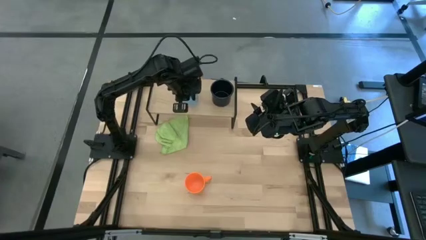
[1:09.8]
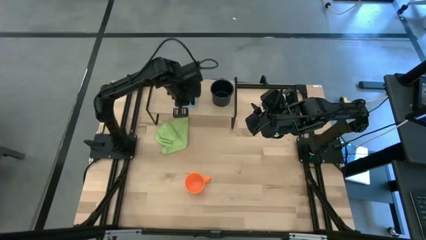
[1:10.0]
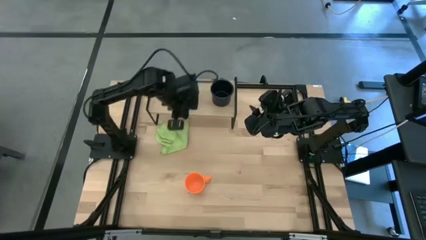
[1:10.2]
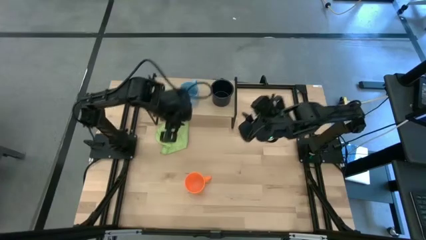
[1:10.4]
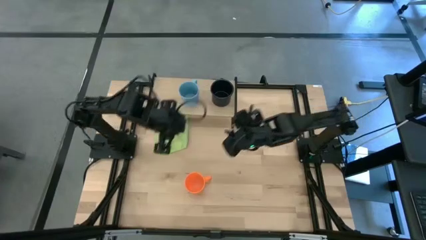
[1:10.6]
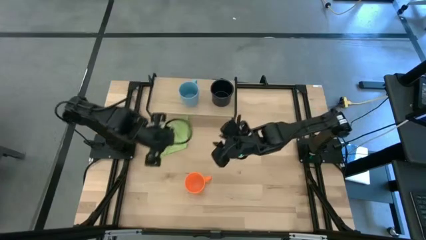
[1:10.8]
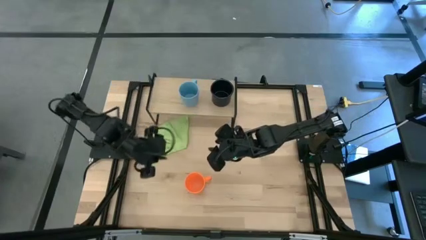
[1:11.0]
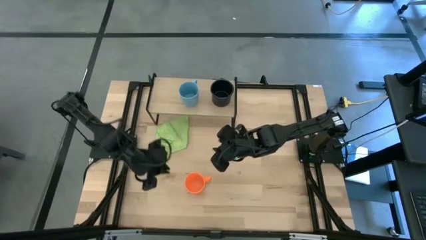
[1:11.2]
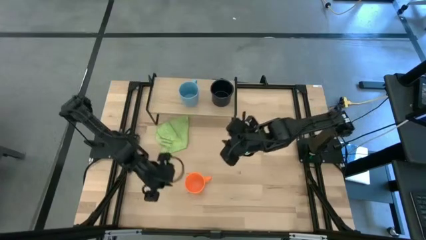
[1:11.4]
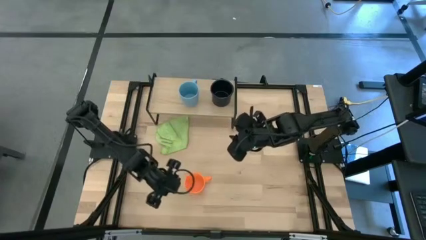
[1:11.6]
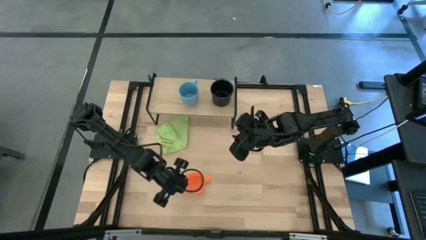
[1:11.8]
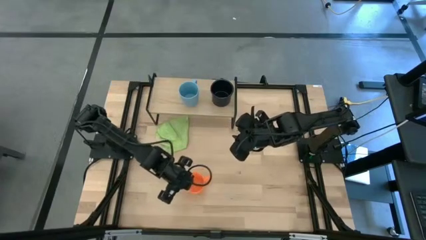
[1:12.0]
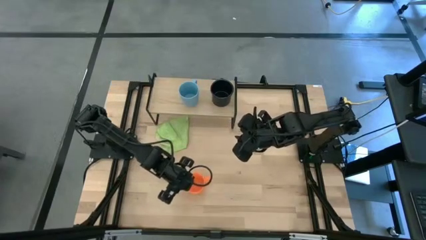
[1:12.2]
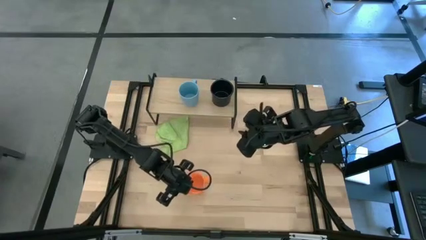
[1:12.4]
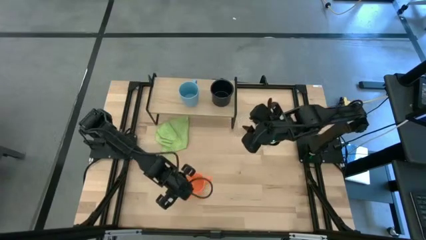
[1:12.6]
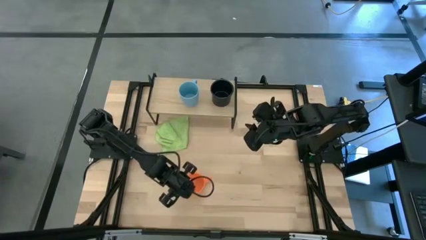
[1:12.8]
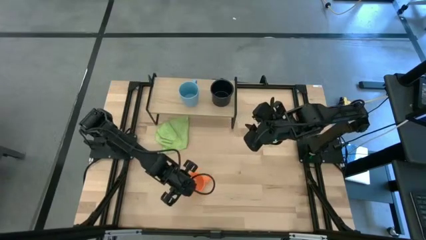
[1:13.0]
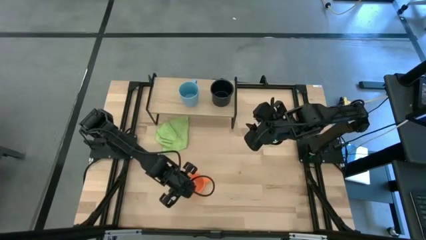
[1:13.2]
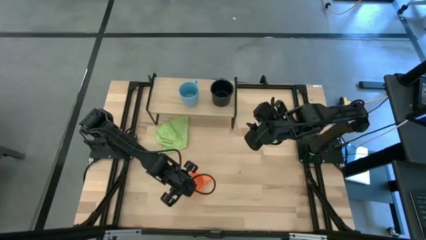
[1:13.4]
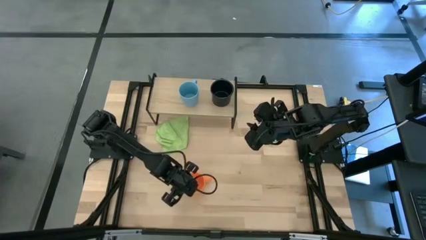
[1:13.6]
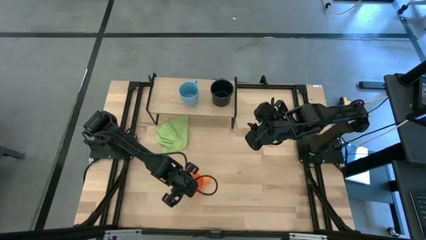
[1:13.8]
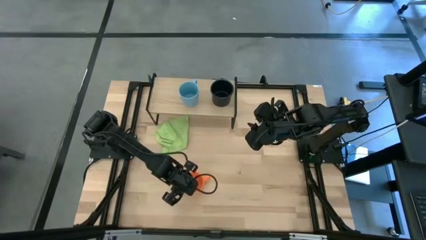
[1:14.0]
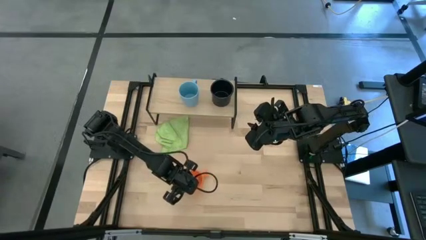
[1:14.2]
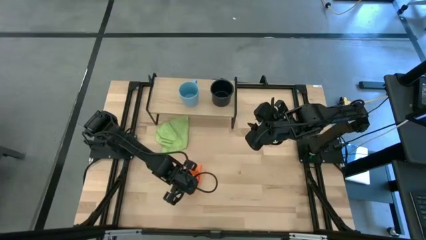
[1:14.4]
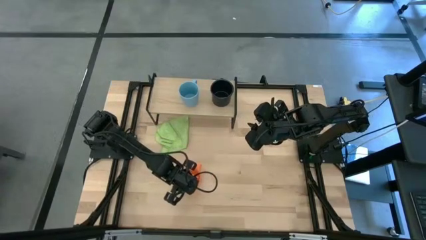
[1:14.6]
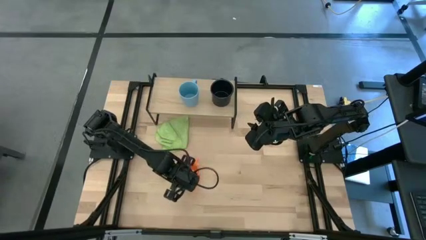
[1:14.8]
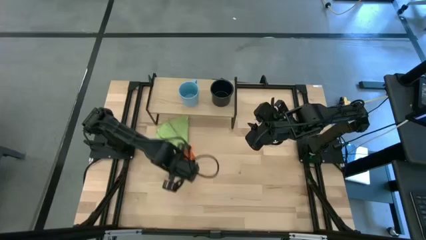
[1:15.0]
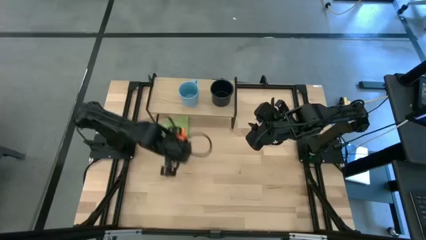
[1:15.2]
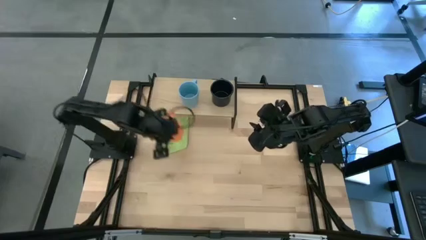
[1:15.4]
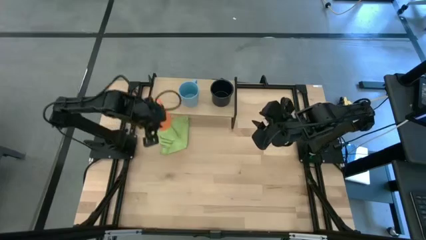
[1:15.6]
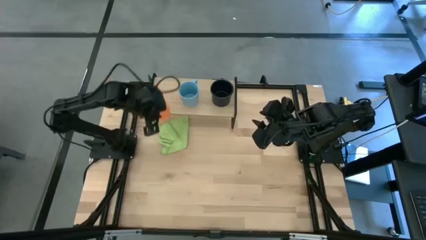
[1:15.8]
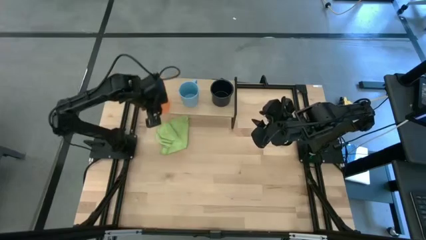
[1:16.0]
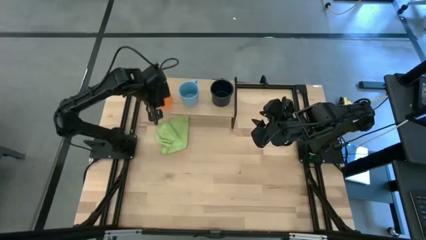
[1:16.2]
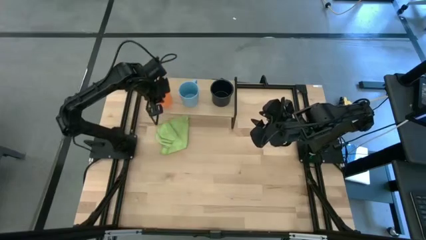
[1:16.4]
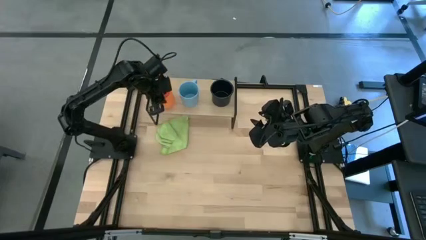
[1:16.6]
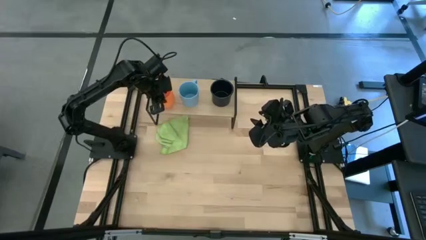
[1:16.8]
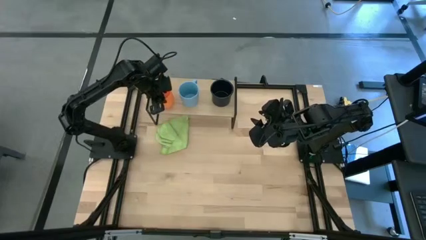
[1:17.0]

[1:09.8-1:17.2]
Task: Stack small to large cups/mugs on shelf
Put the orange mug on the shelf

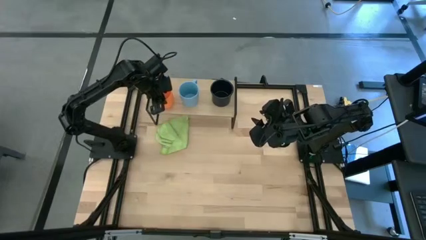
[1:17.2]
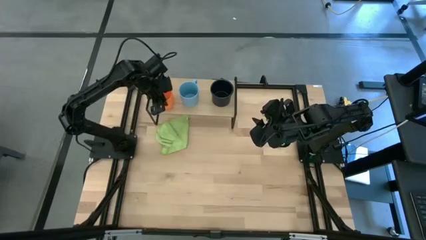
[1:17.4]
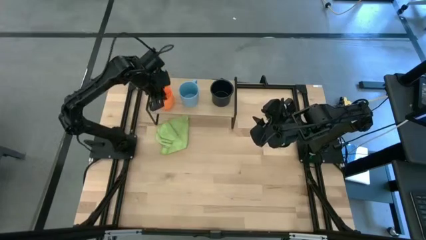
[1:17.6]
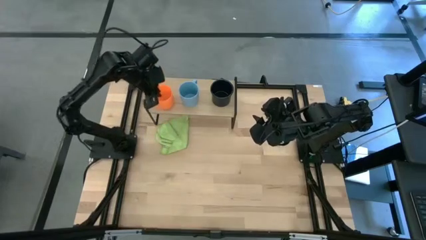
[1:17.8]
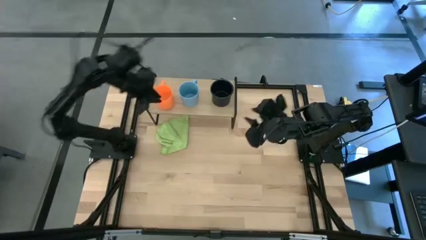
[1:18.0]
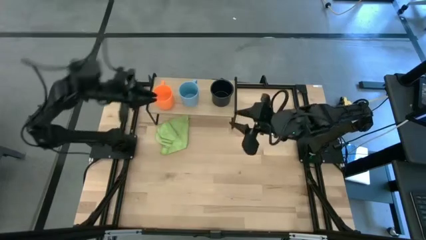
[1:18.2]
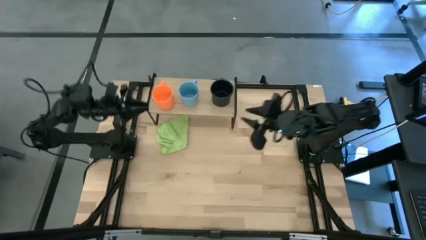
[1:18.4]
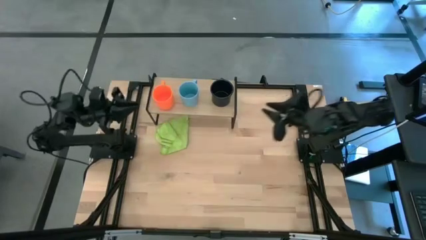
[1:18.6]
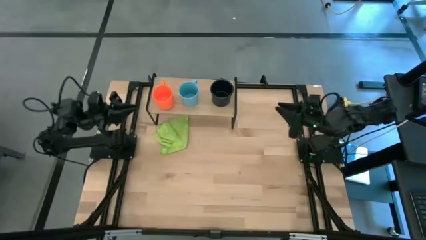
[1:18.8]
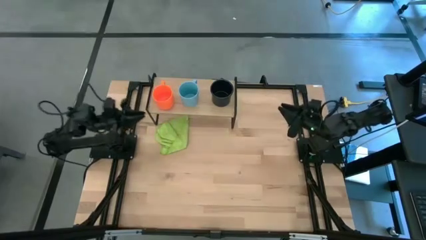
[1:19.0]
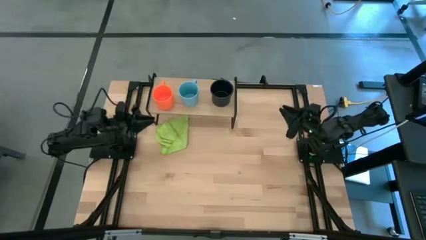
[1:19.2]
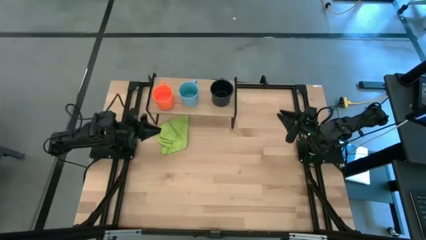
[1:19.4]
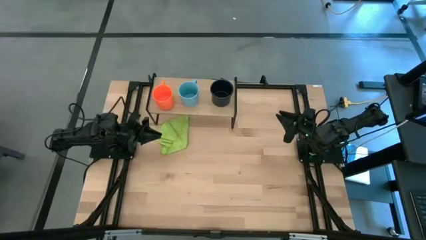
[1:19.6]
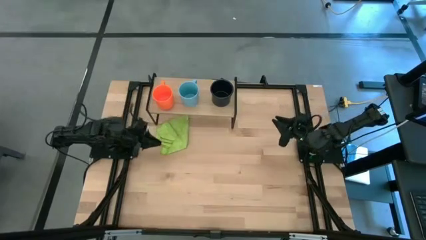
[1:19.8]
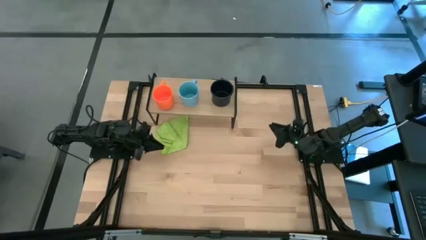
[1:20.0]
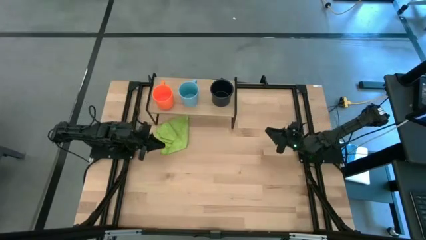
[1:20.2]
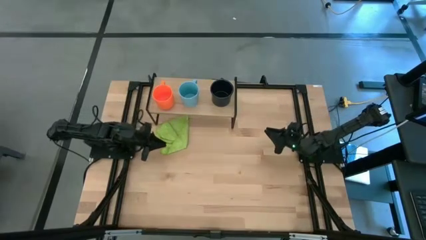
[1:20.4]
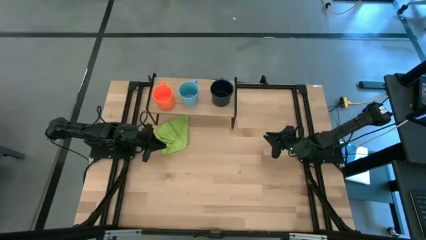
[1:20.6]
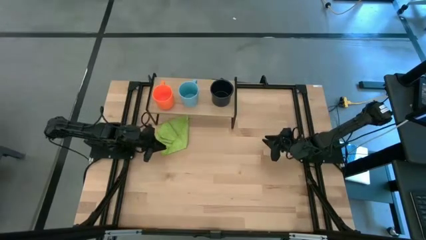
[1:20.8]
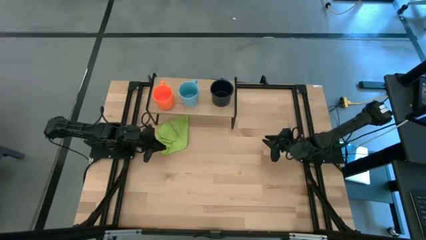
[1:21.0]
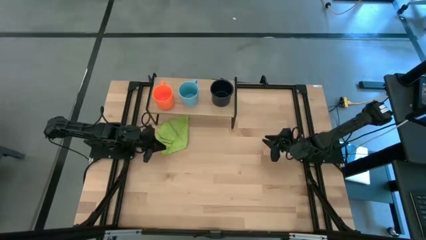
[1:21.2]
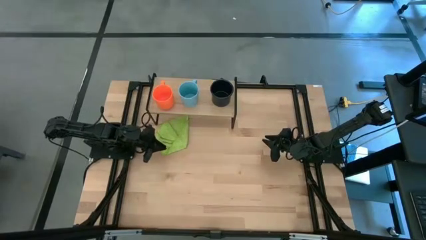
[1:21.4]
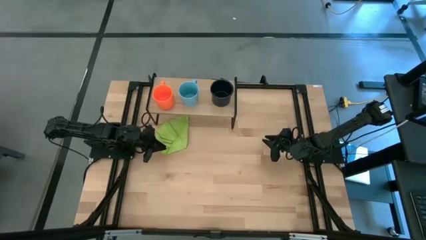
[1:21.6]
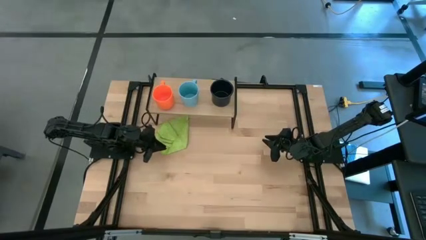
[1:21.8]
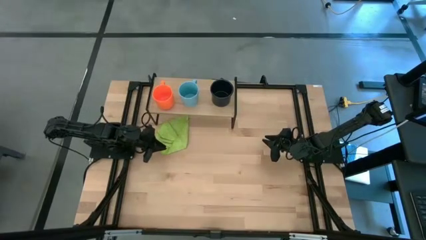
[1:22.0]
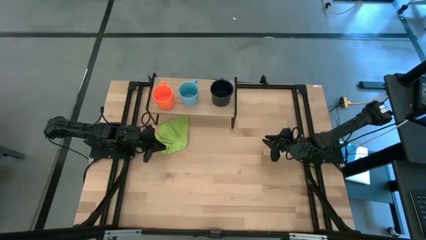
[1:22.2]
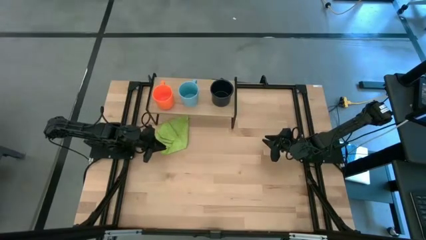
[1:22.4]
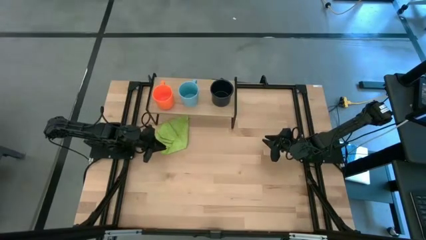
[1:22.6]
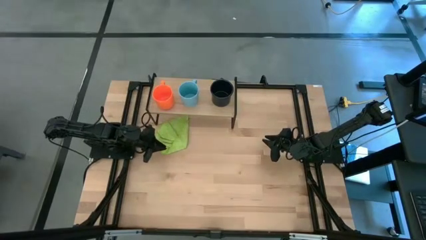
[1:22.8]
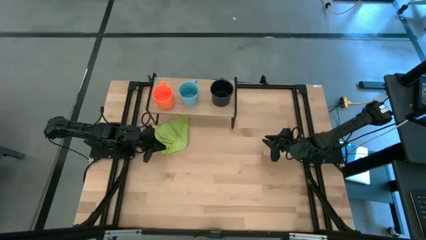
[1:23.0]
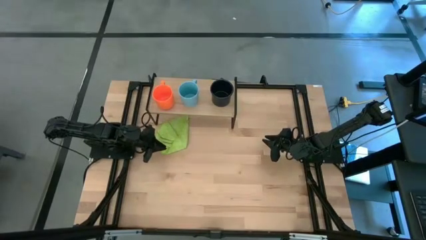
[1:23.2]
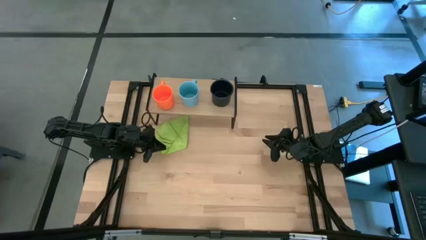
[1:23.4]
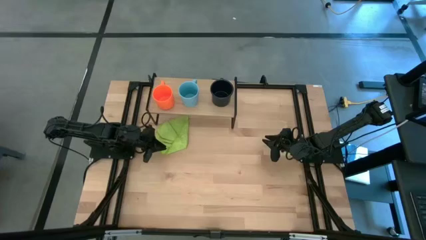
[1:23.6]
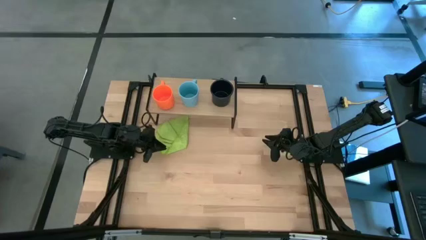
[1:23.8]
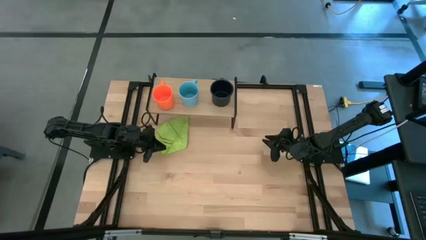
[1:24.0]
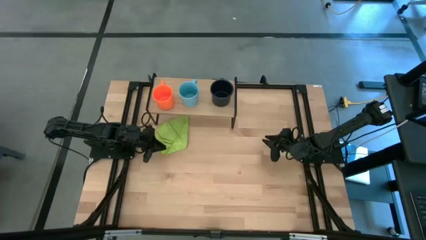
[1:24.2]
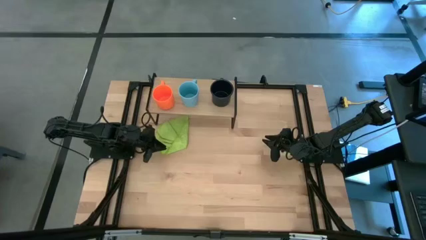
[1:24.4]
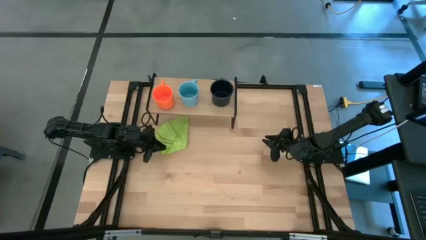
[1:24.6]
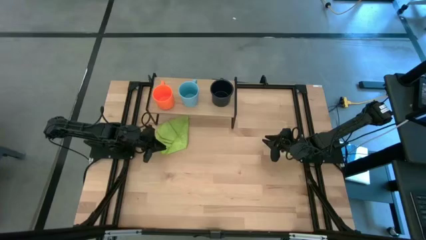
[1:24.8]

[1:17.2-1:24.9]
Return to Home Position
